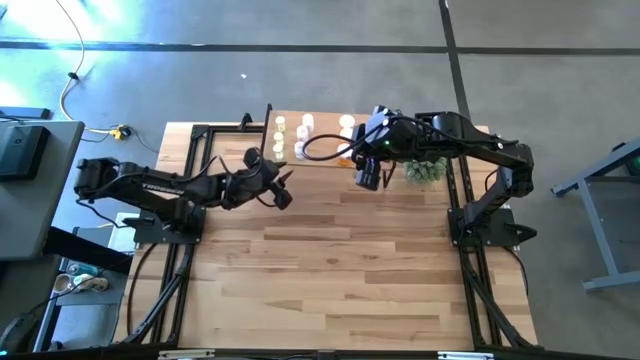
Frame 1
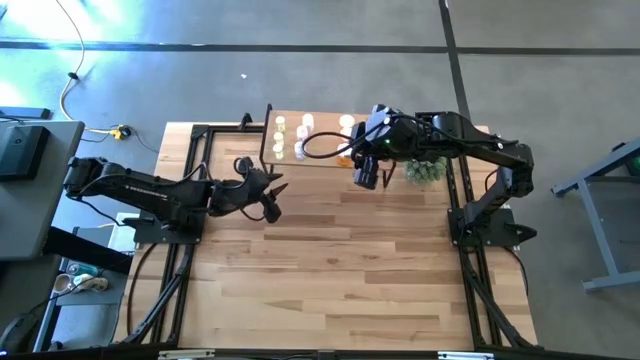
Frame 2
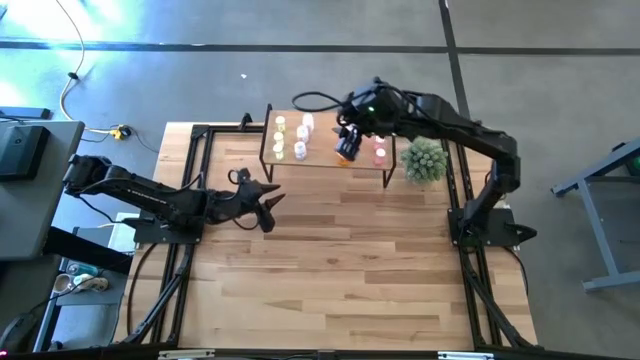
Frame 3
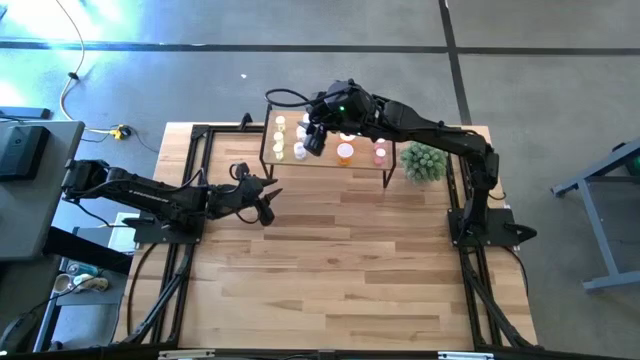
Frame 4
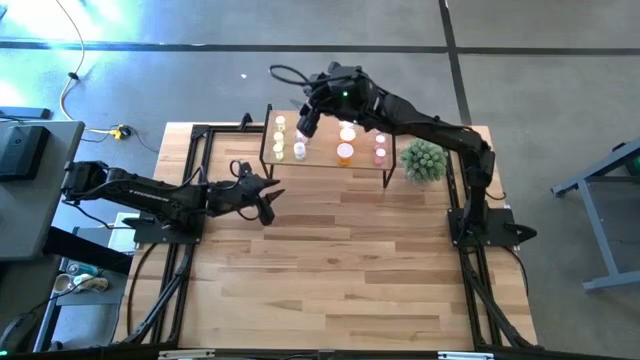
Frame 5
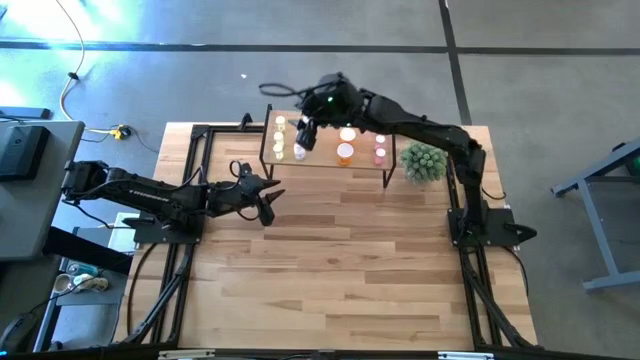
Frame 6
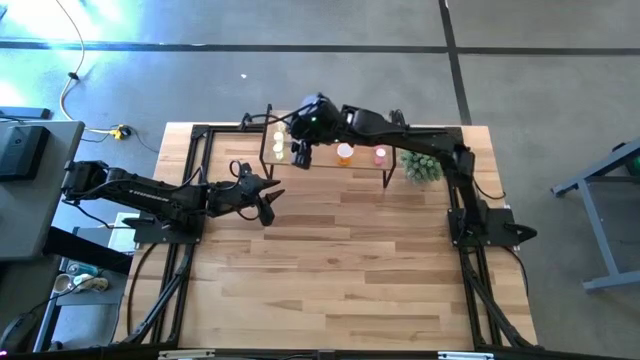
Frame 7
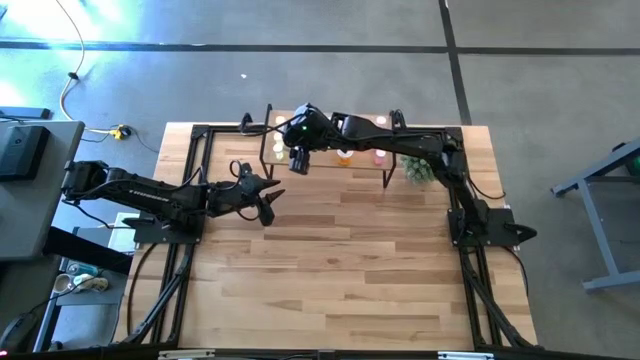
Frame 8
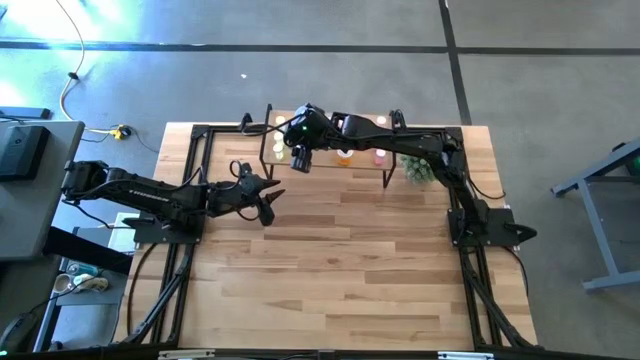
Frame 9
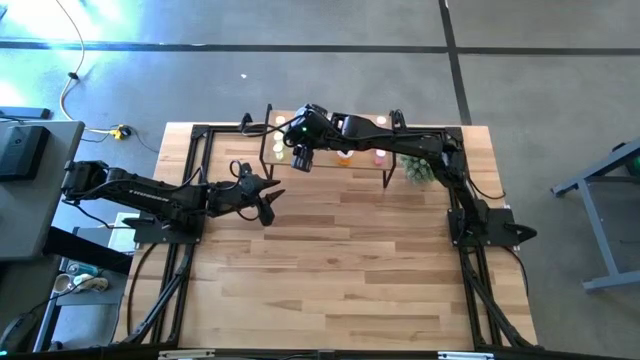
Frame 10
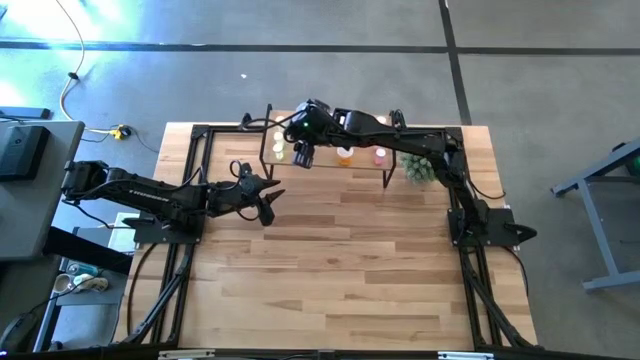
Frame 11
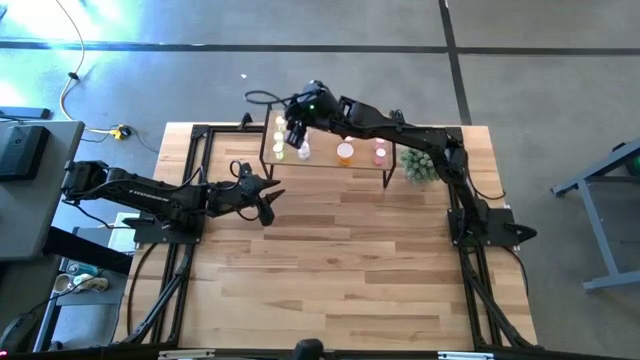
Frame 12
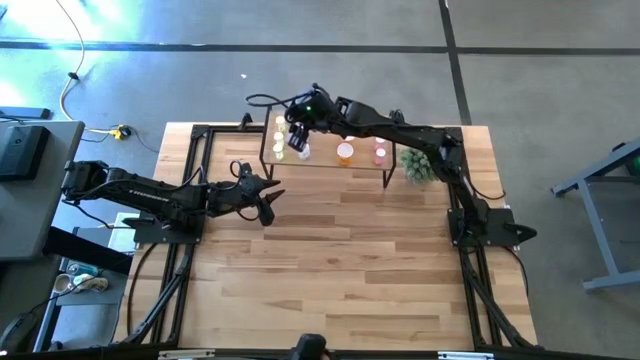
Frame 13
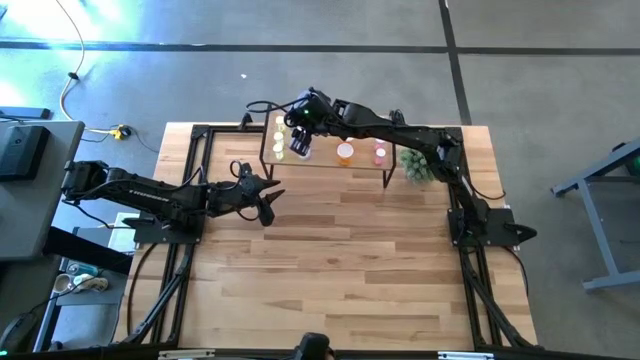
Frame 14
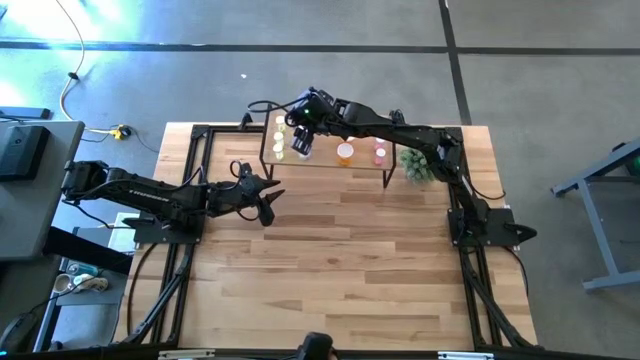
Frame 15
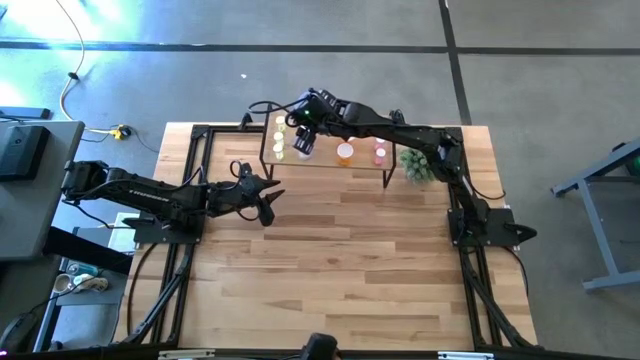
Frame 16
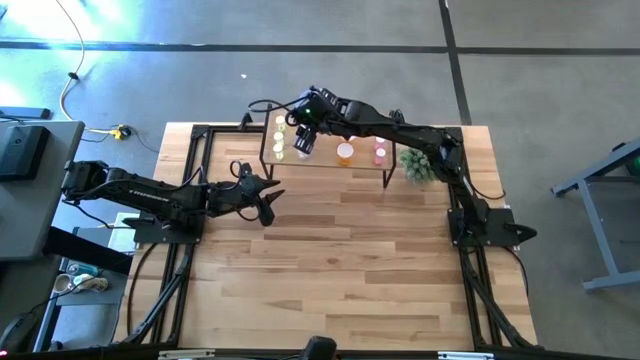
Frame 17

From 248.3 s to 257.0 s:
Task: Pick and place medicine bottles onto shelf by color
Adjust the bottles on the shelf

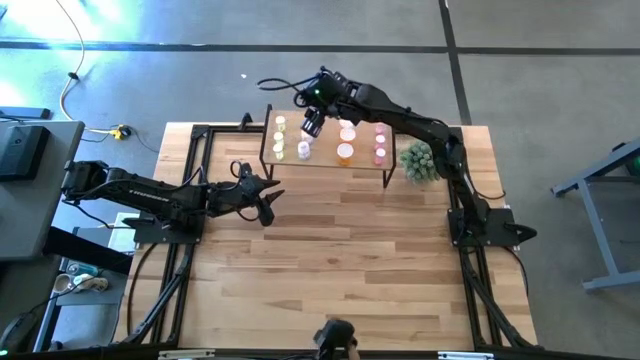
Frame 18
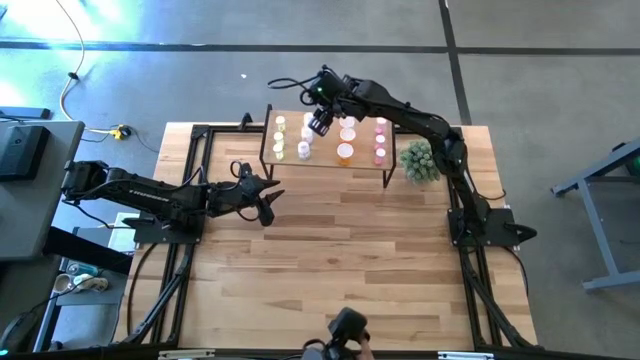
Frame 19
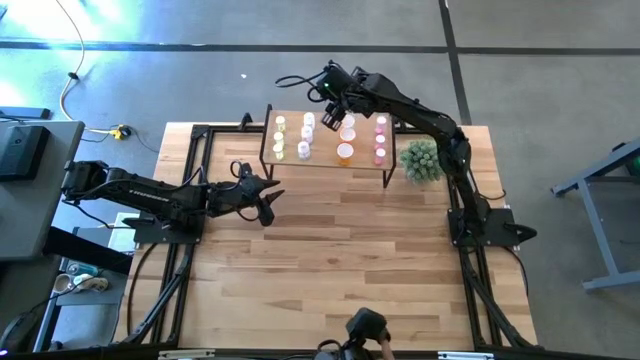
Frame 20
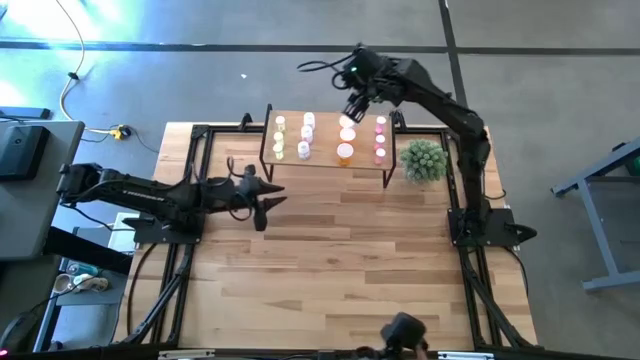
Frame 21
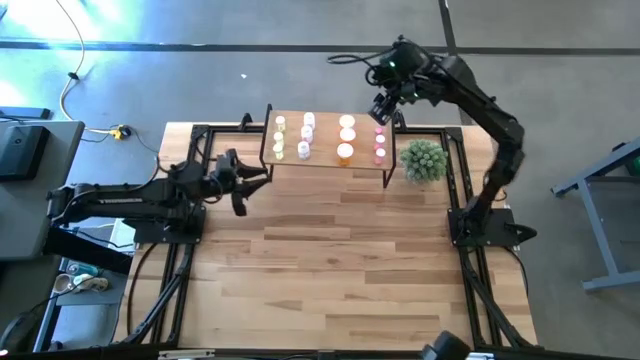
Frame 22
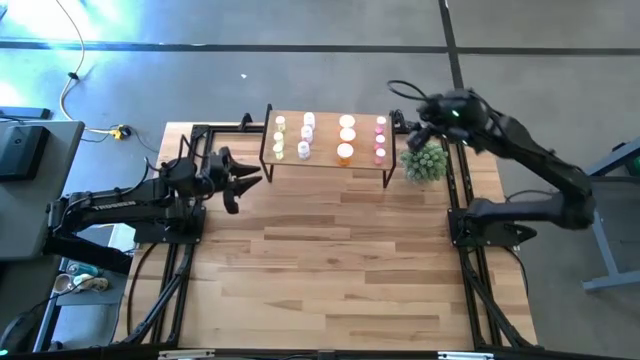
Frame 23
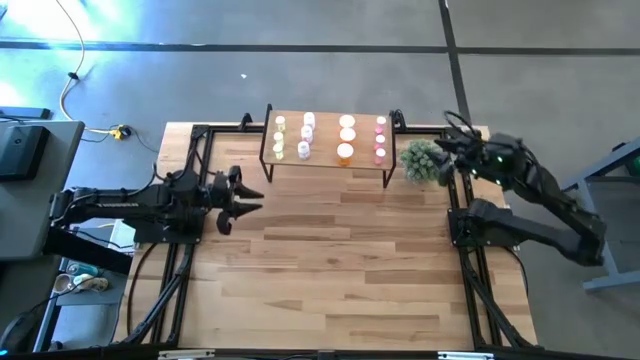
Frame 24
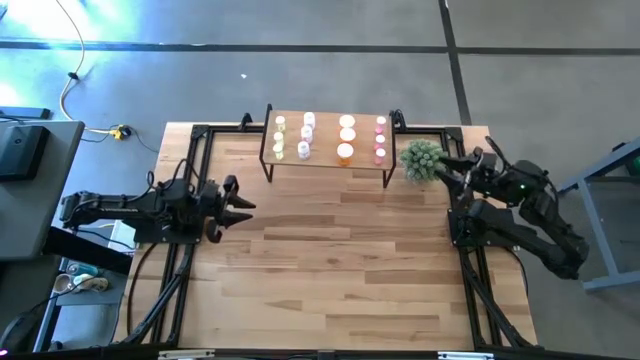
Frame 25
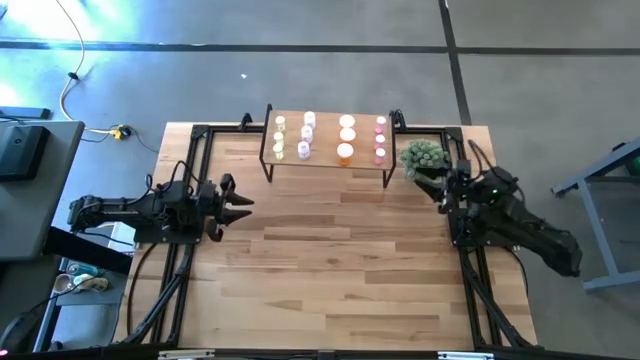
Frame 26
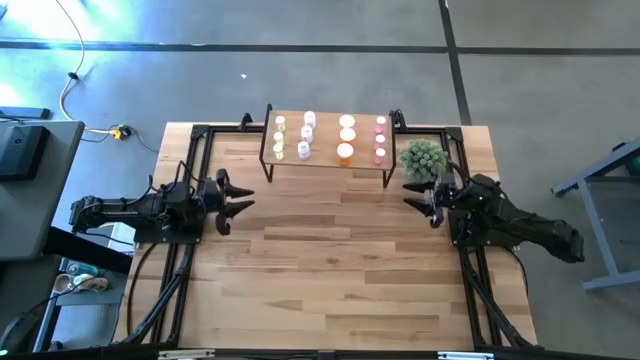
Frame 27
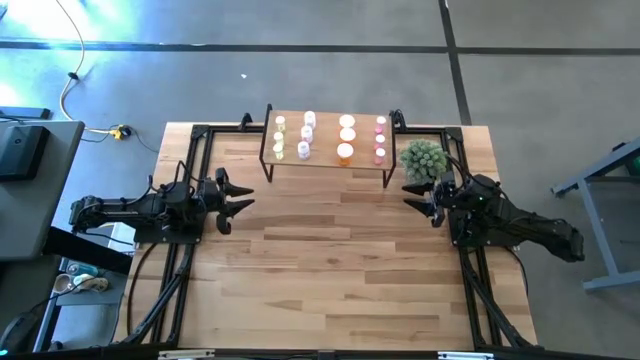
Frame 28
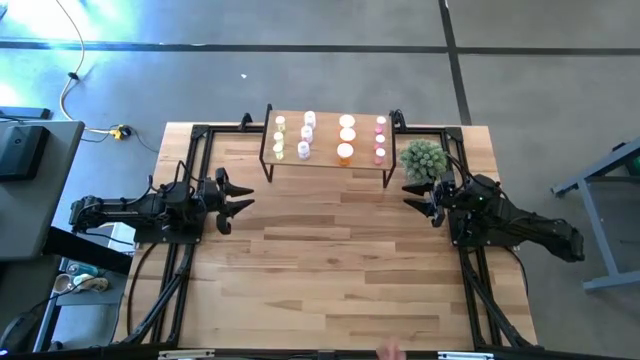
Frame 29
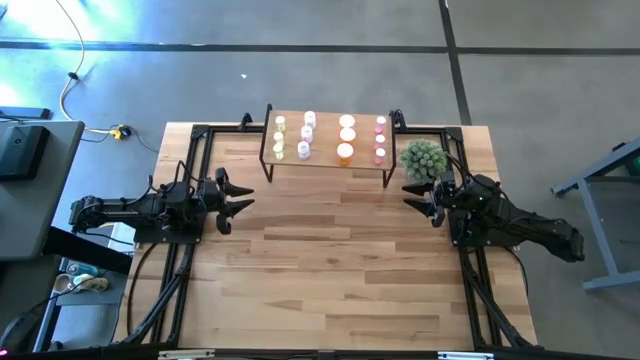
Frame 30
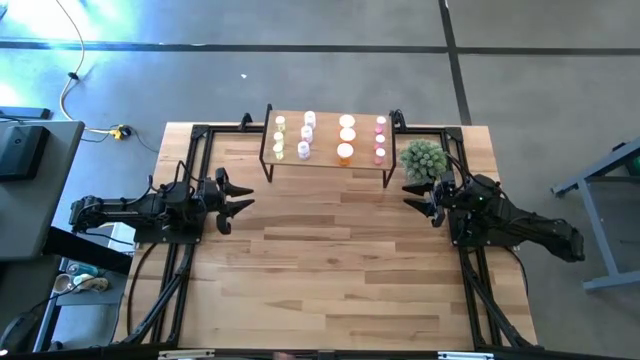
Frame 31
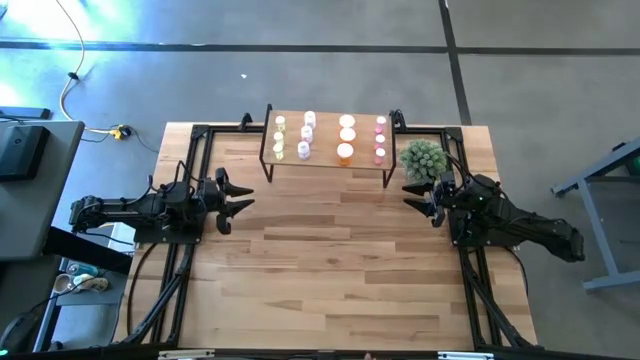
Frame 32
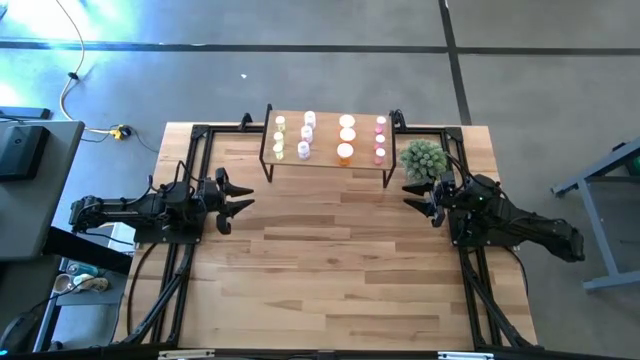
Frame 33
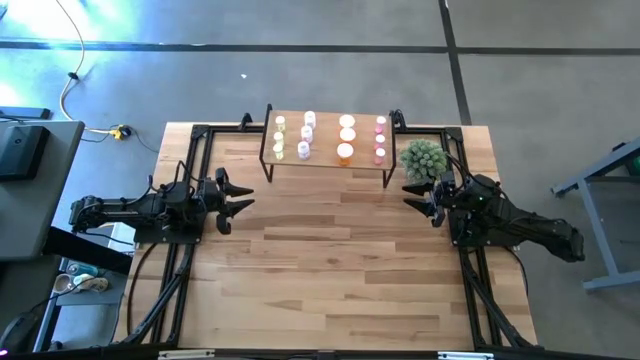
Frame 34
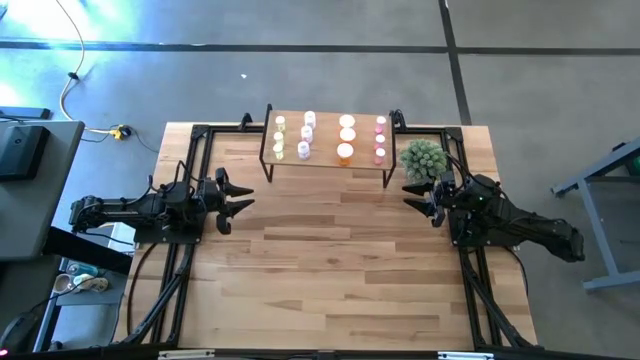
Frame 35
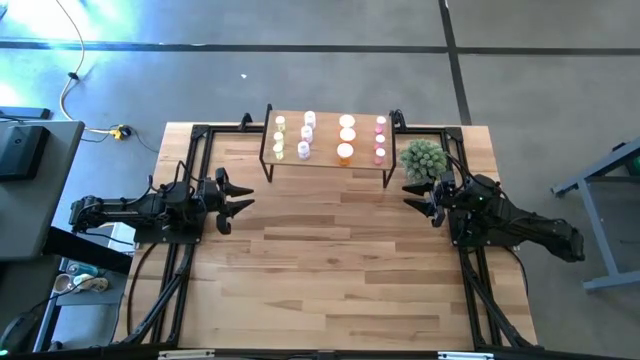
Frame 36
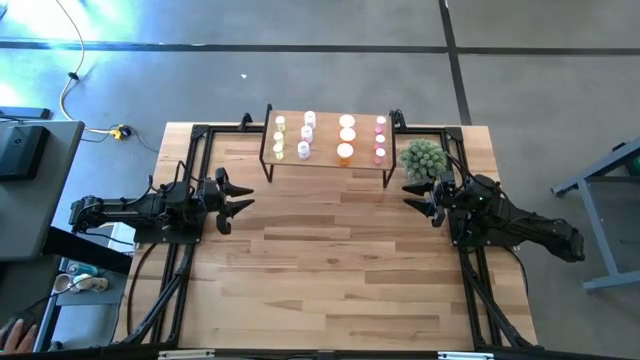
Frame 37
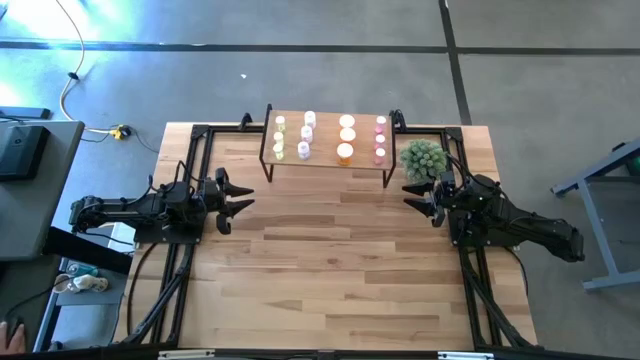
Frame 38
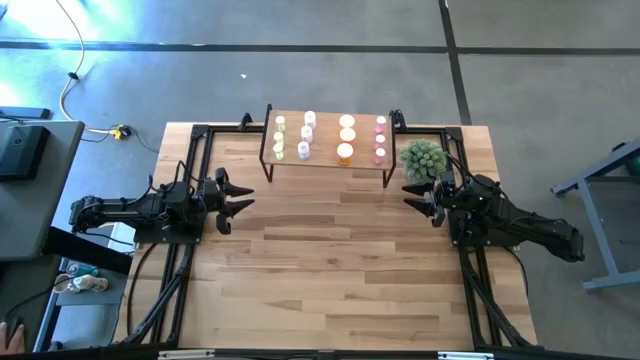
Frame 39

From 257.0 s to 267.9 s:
Return to Home Position

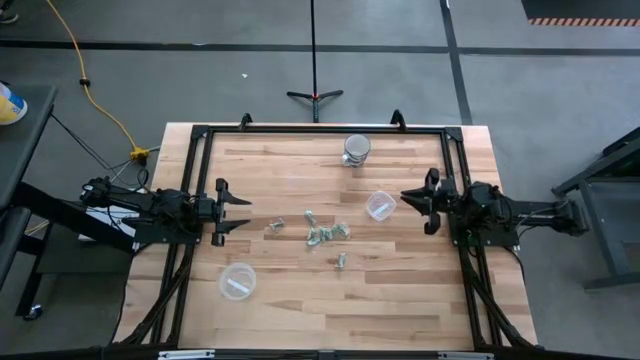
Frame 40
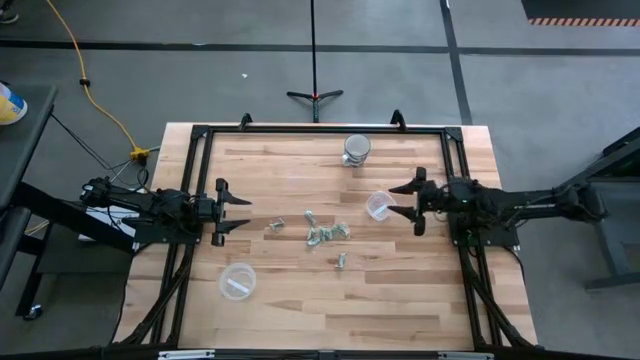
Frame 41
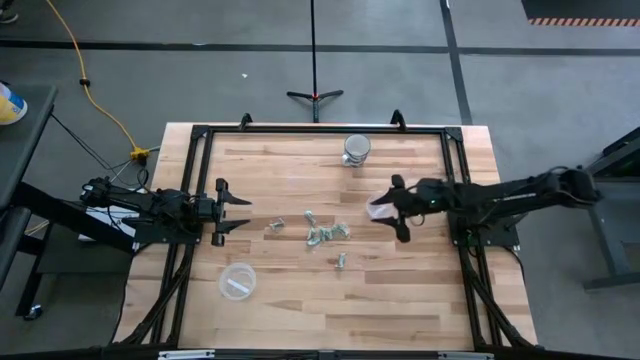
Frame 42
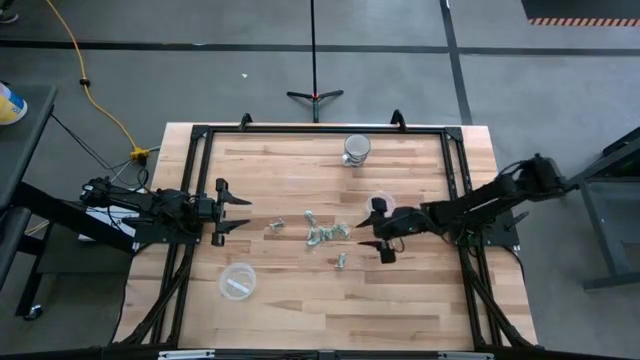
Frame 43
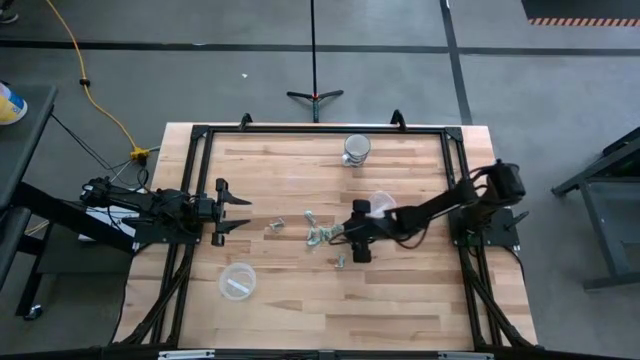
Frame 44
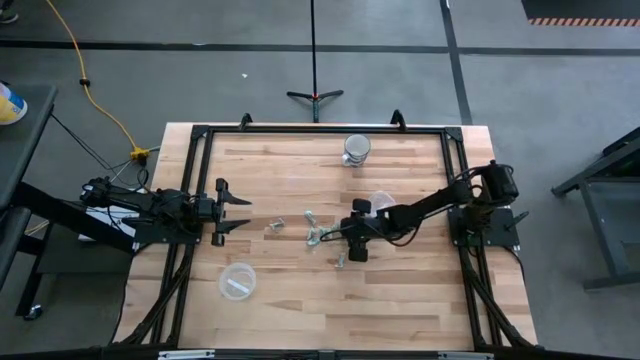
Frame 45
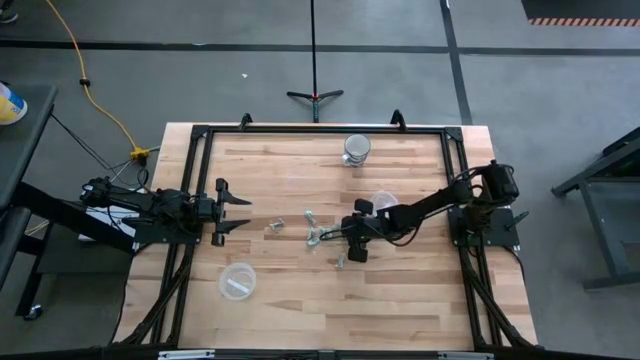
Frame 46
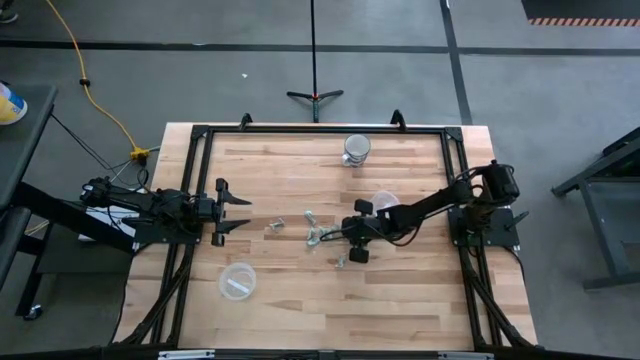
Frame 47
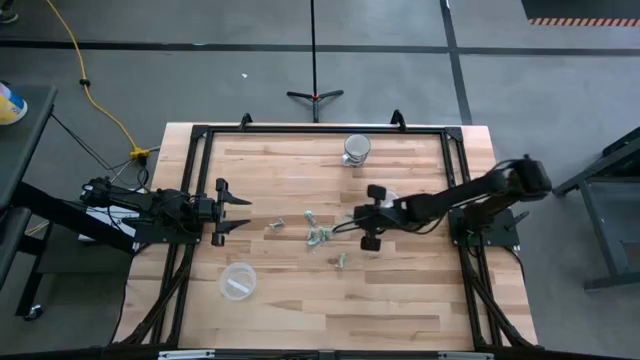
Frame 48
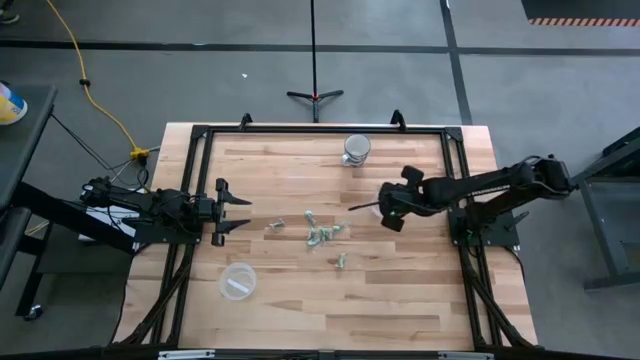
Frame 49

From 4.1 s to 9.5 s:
Task: Pick and place Stevia / Truvia into bins
Put the stevia packet into the square transparent container
